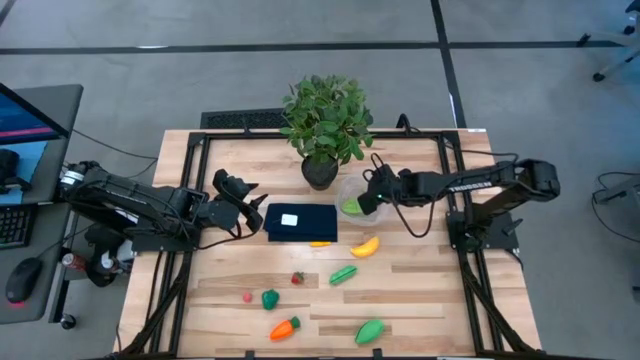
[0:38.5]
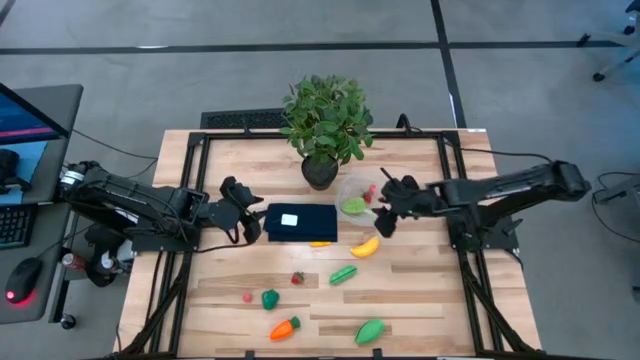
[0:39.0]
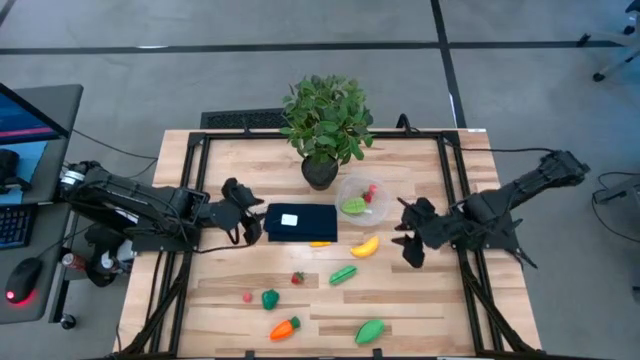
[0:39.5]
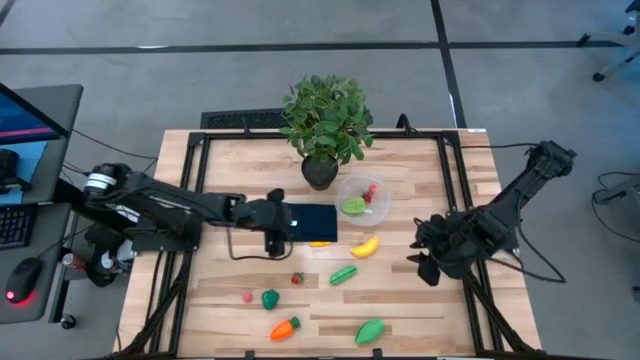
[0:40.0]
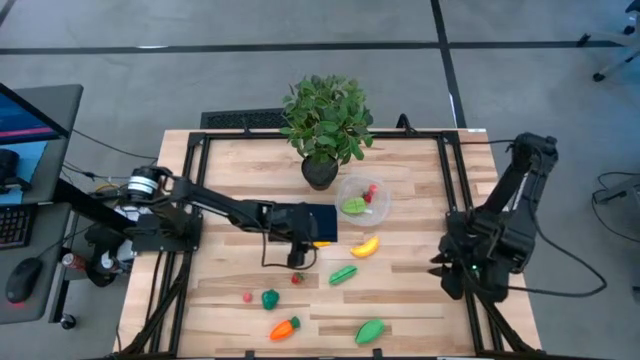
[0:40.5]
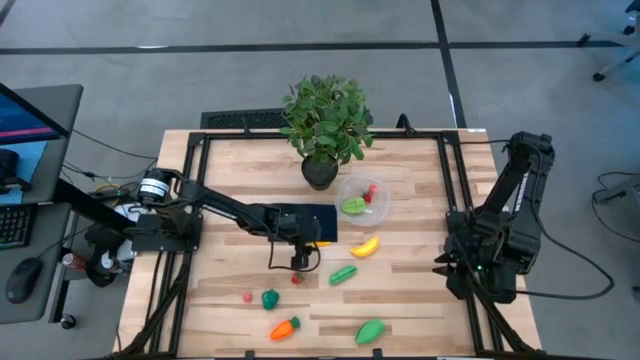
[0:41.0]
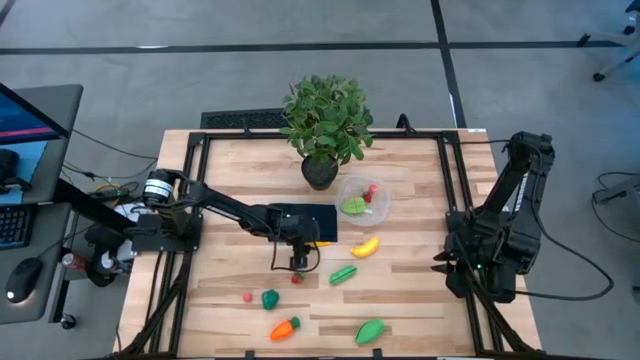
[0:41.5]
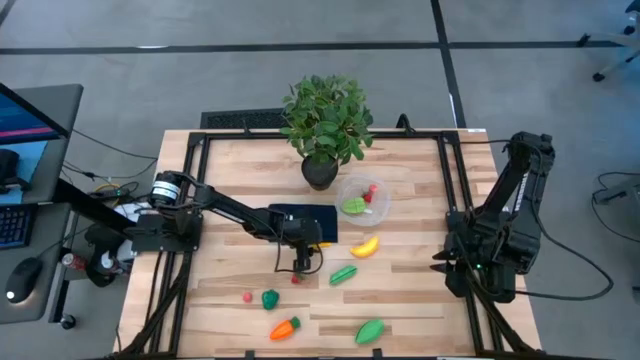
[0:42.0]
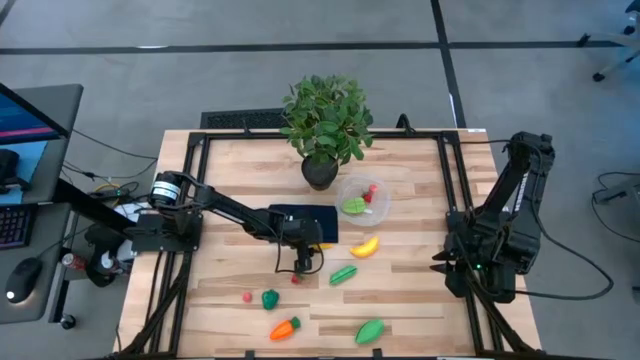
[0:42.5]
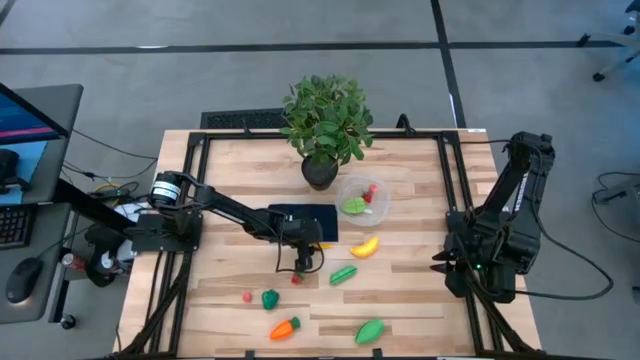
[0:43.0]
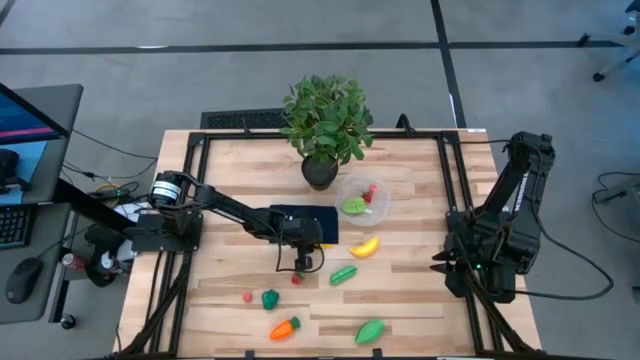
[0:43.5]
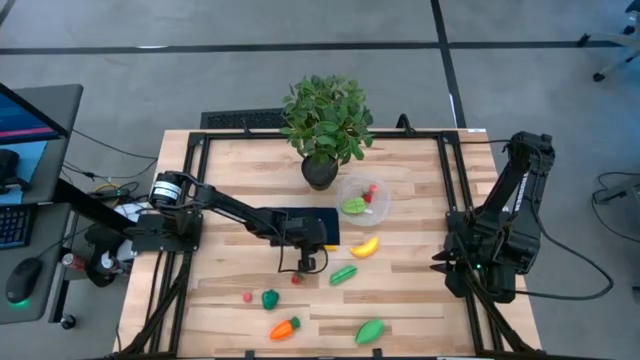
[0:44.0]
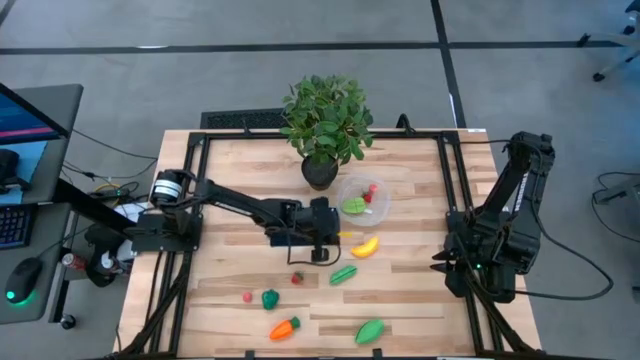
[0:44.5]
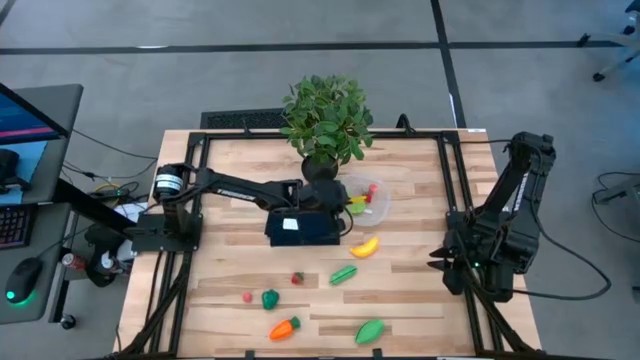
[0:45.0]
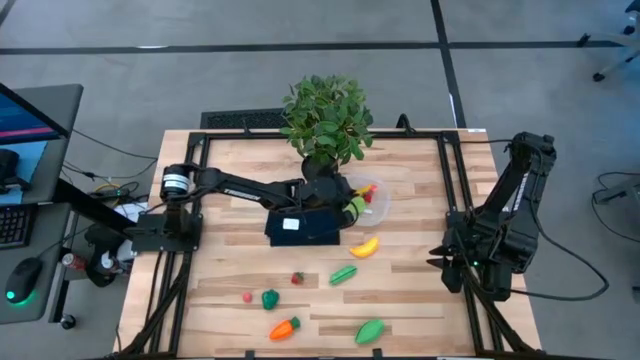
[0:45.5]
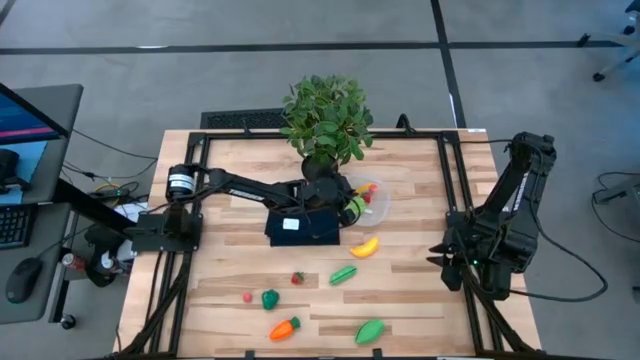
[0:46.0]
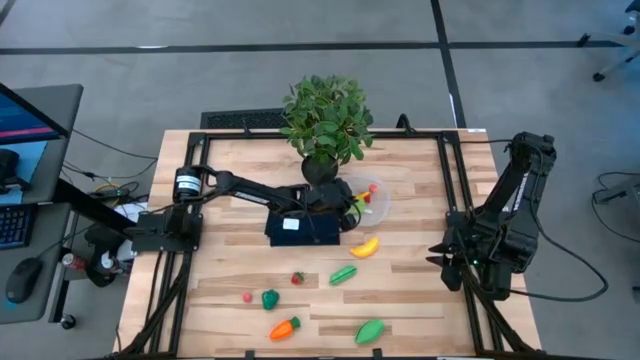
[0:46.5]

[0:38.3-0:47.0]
Task: Pick and placing Produce into tupperware
Put the yellow corn into the transparent container

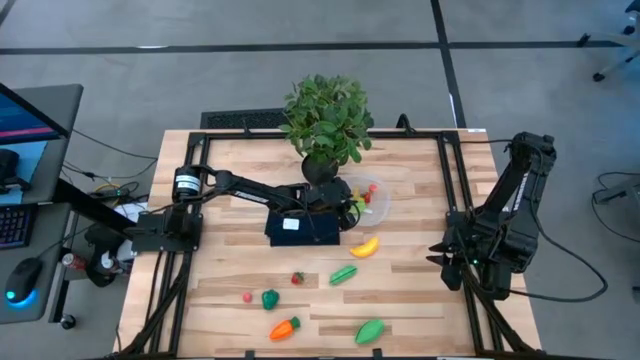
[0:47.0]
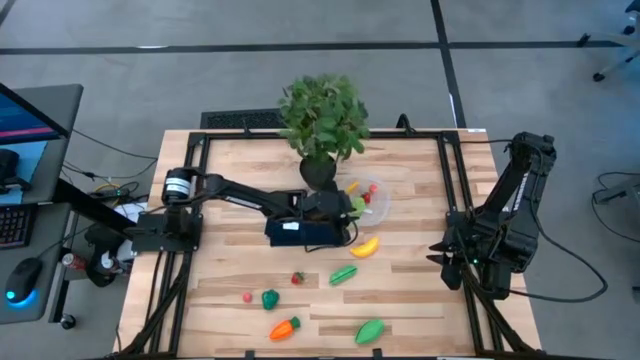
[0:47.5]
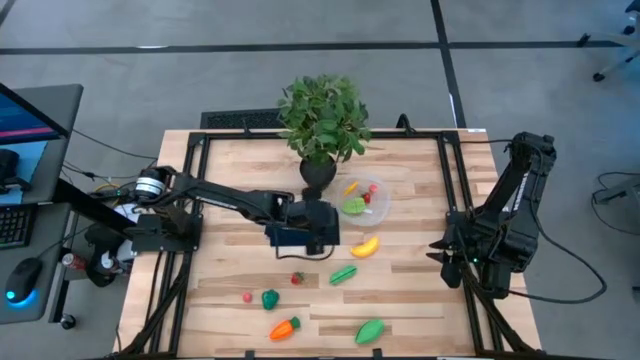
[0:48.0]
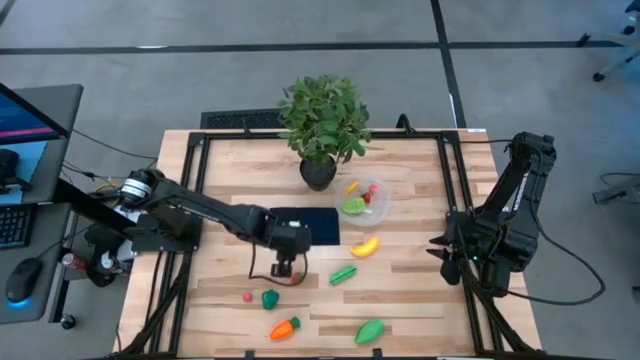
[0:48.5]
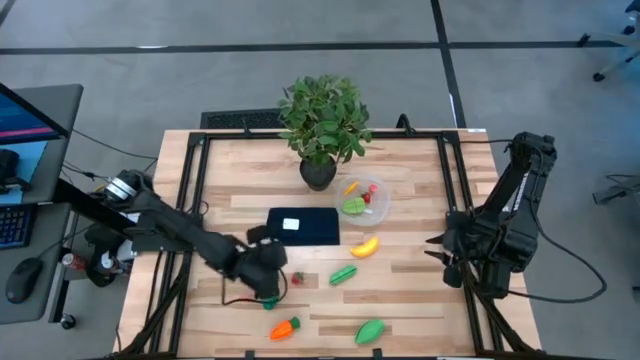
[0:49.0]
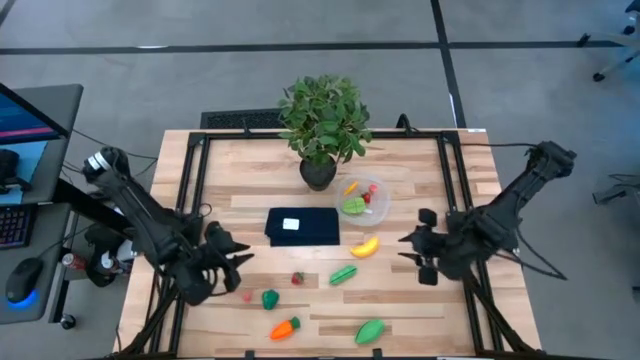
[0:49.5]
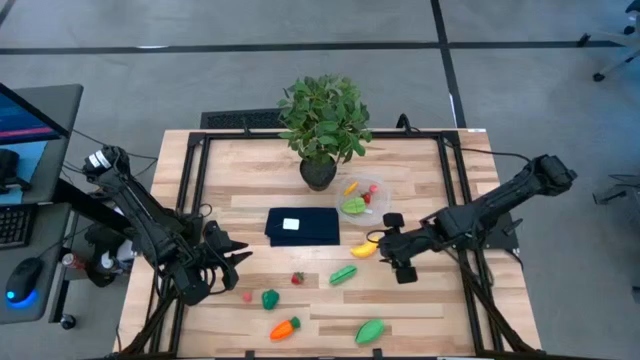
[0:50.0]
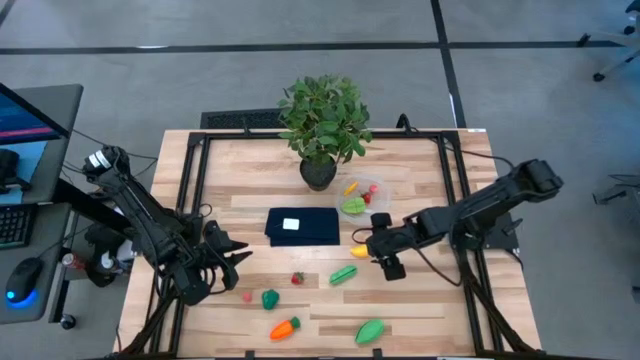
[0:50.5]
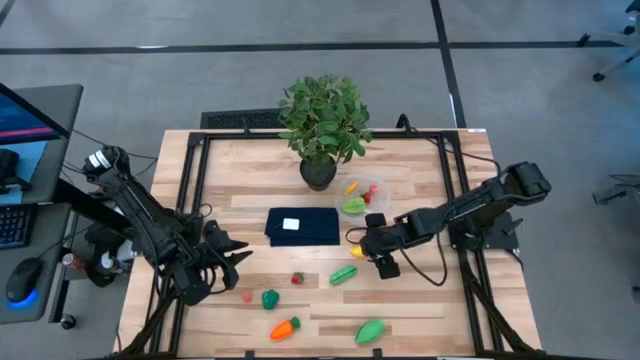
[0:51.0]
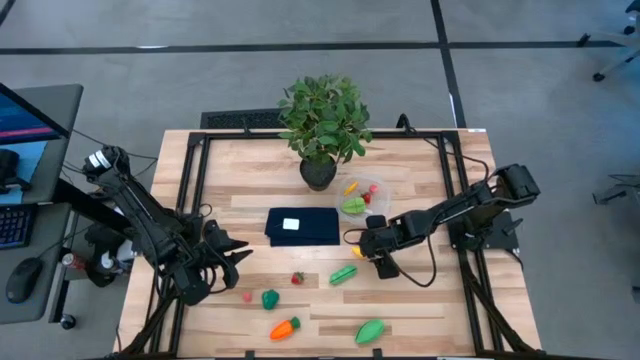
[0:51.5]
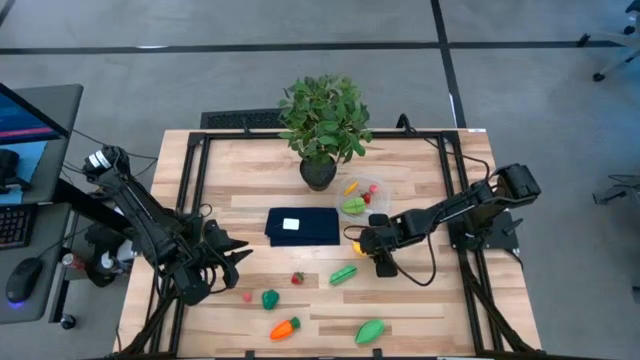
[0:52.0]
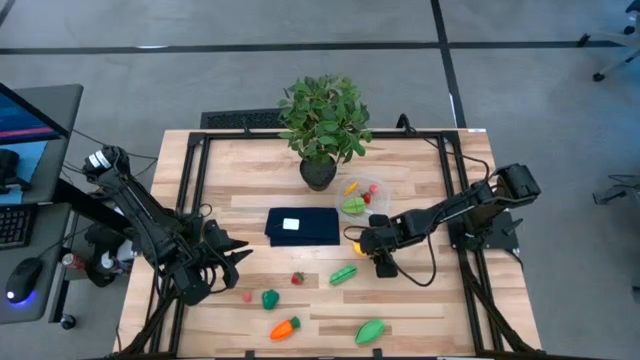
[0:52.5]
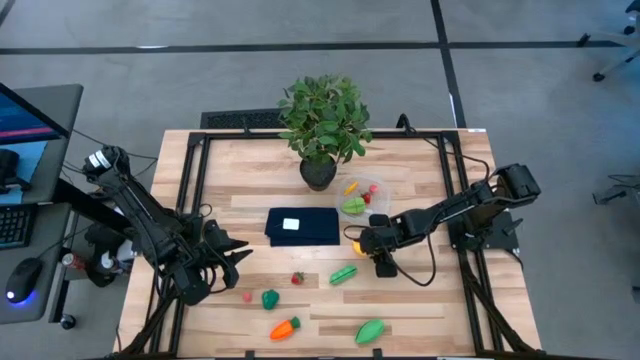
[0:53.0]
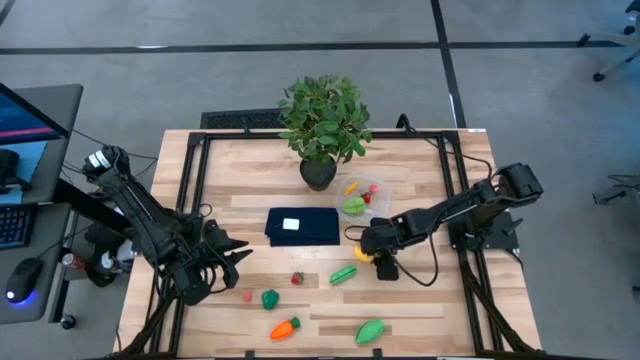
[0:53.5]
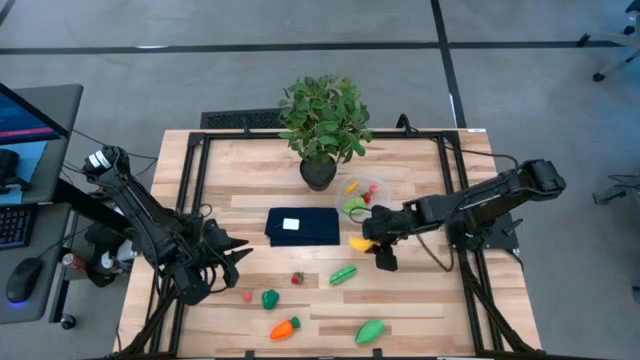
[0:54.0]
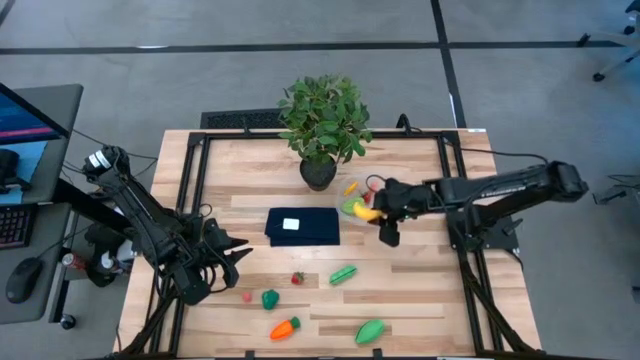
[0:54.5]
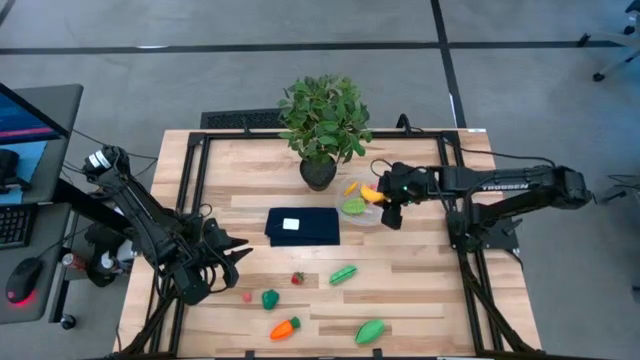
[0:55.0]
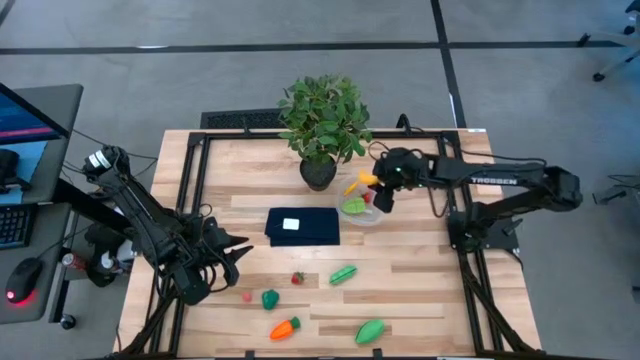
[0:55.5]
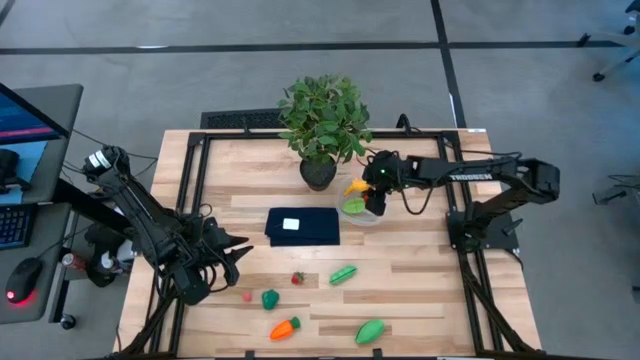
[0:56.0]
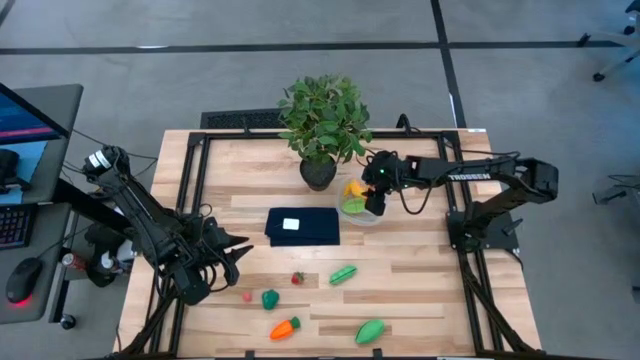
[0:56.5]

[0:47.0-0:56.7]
Put the yellow banana into the transparent container

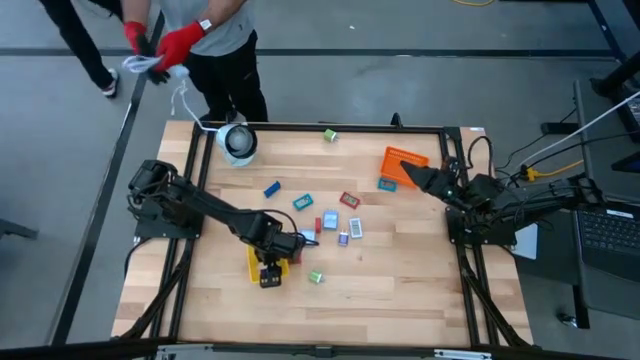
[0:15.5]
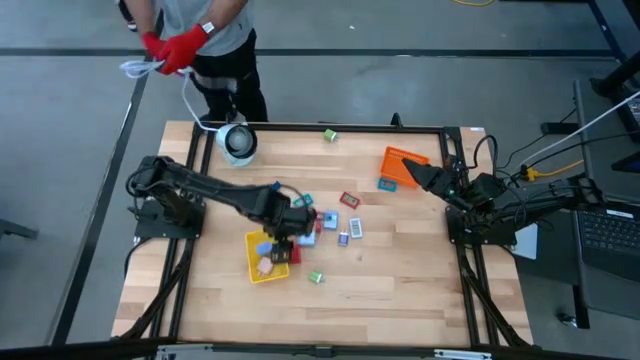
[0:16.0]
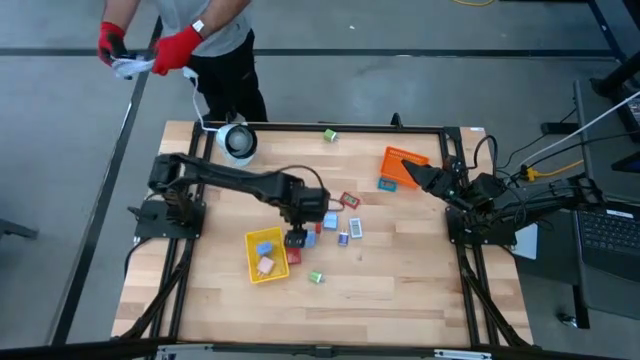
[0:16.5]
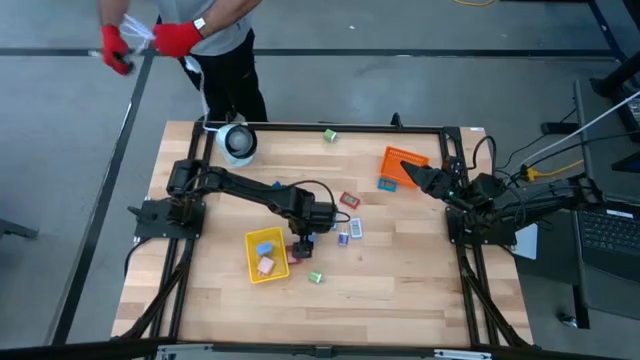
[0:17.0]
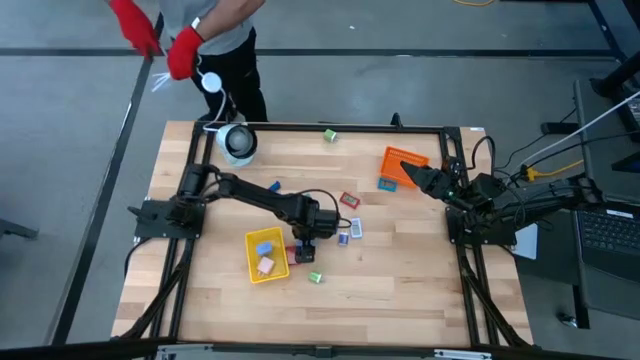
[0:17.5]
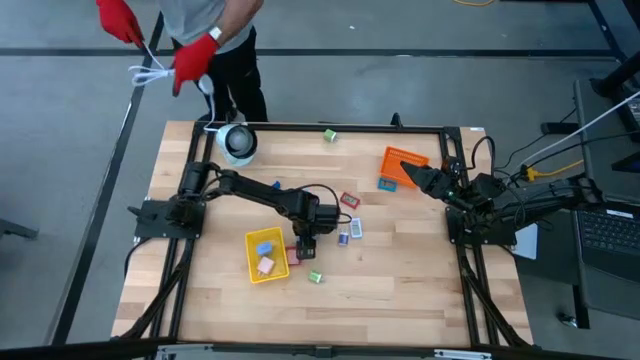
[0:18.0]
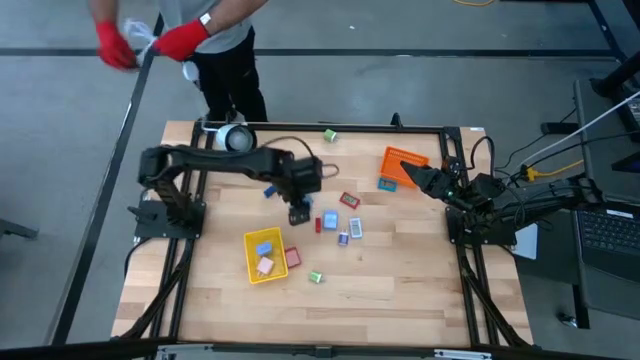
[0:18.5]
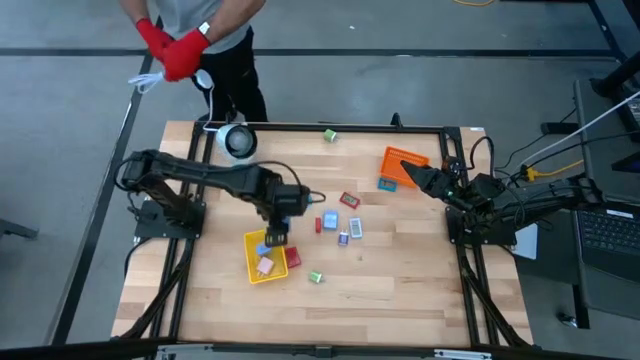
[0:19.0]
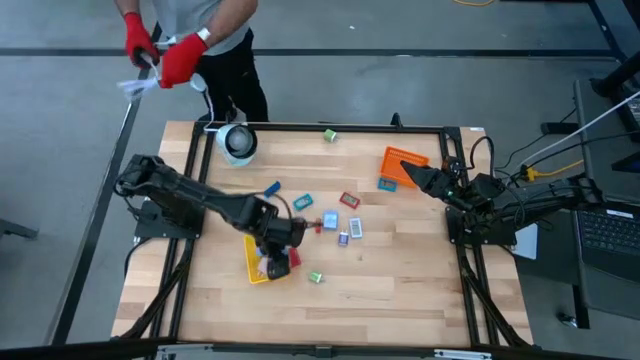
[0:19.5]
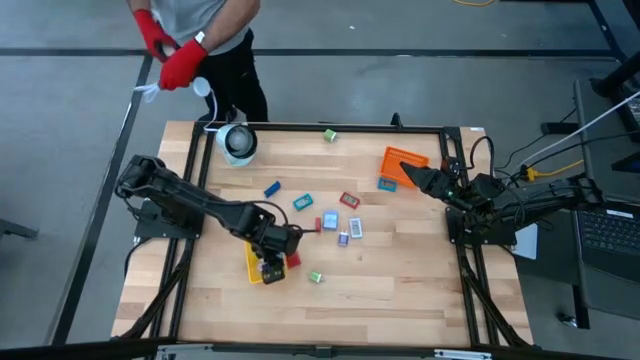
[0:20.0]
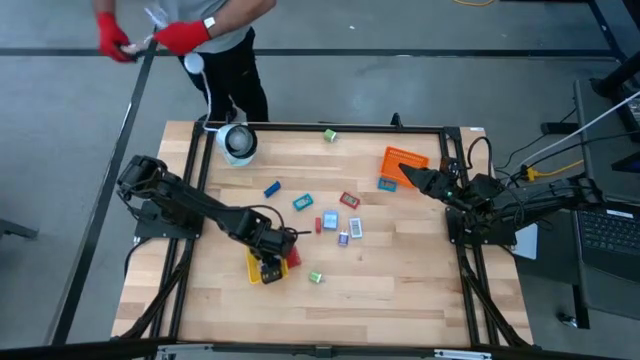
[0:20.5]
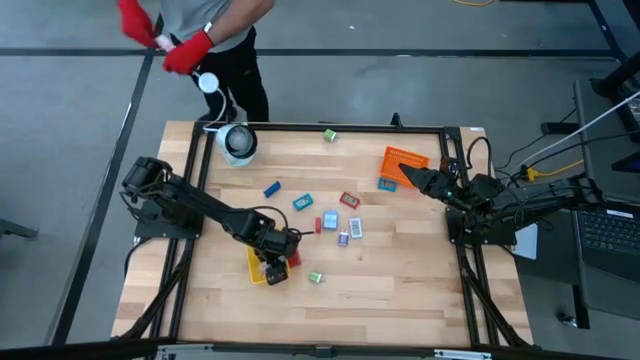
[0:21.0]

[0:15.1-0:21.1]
Task: Pick & Place Office items
Put the bottom light blue charger adapter into the yellow bin
